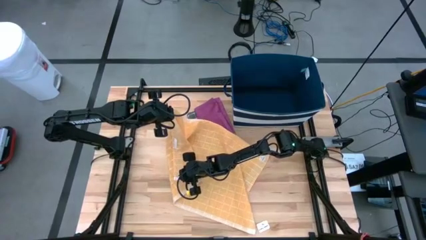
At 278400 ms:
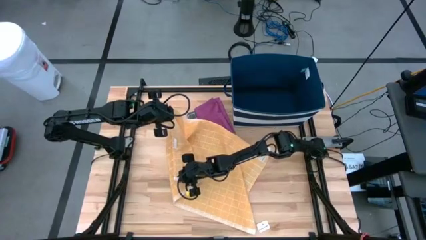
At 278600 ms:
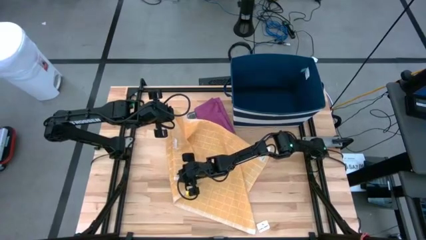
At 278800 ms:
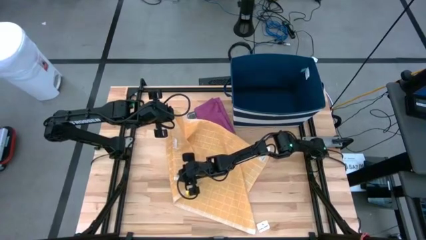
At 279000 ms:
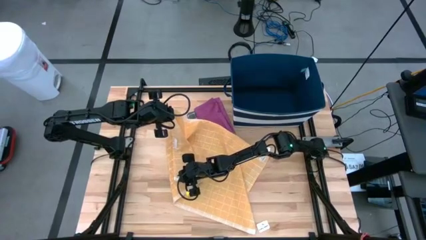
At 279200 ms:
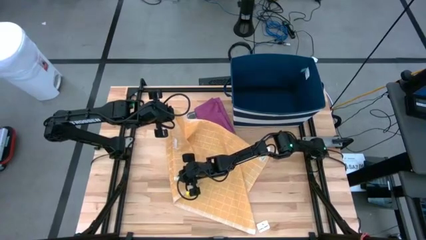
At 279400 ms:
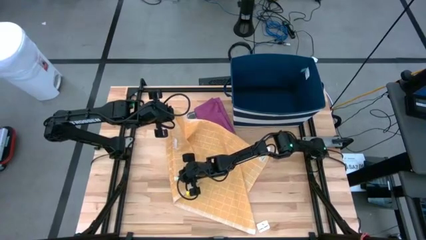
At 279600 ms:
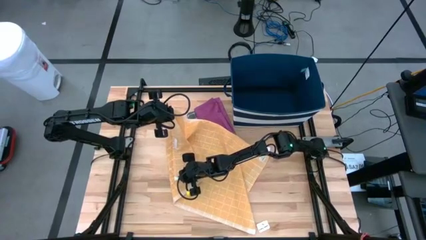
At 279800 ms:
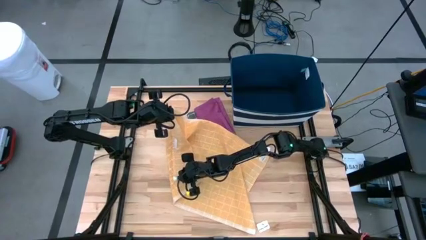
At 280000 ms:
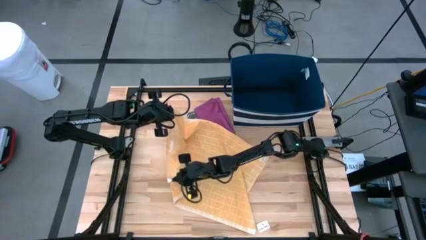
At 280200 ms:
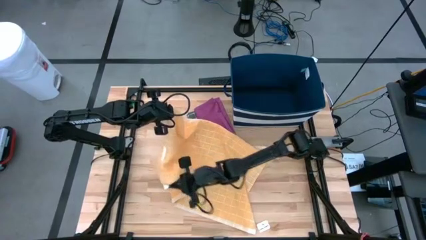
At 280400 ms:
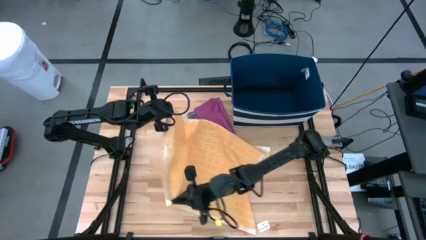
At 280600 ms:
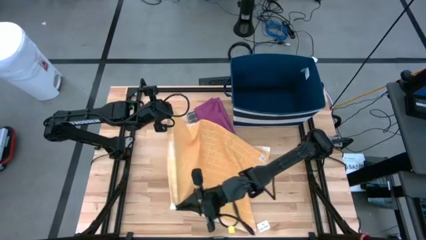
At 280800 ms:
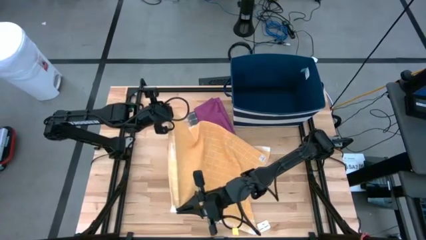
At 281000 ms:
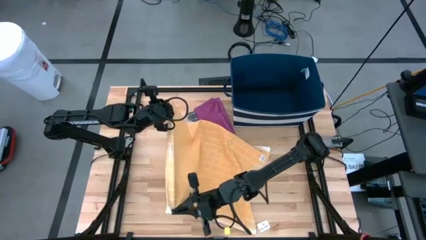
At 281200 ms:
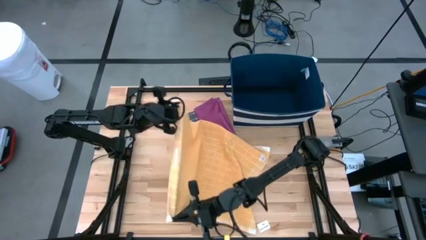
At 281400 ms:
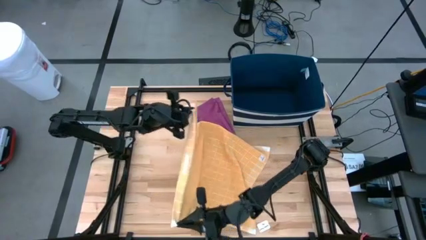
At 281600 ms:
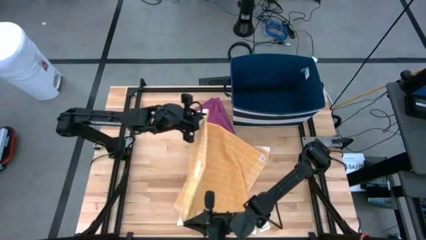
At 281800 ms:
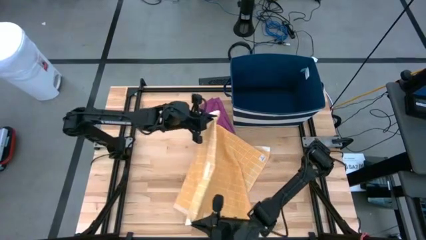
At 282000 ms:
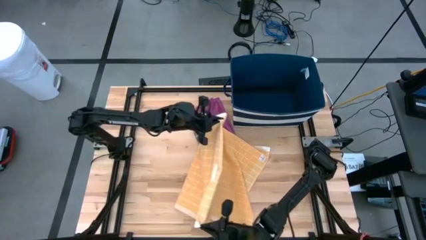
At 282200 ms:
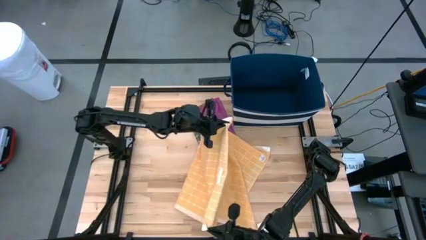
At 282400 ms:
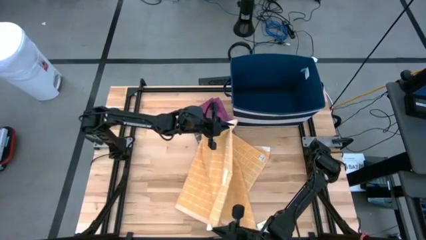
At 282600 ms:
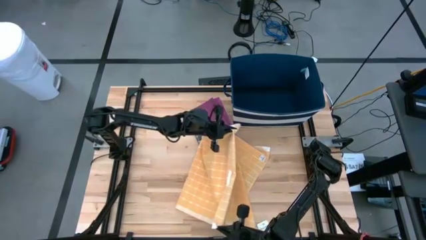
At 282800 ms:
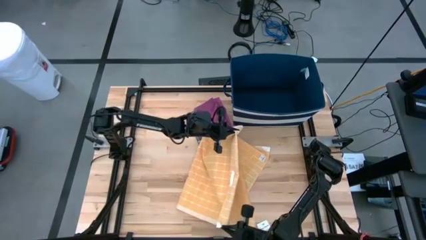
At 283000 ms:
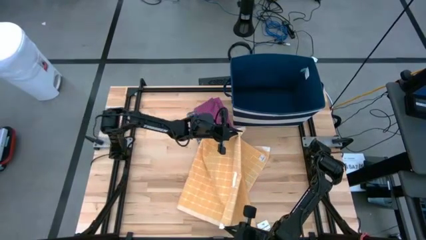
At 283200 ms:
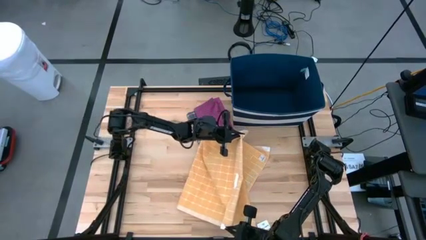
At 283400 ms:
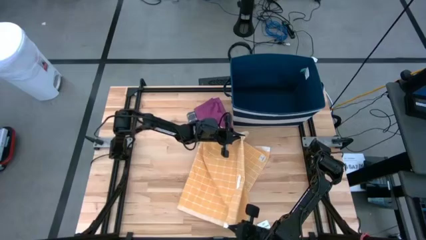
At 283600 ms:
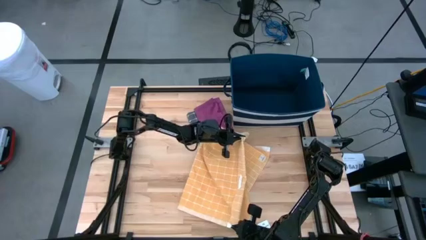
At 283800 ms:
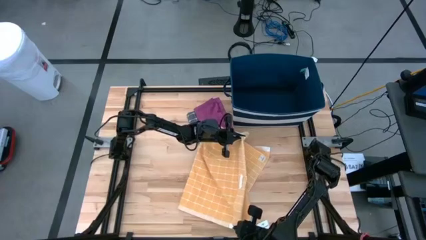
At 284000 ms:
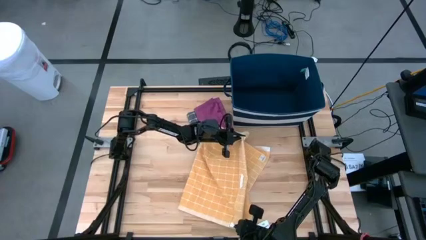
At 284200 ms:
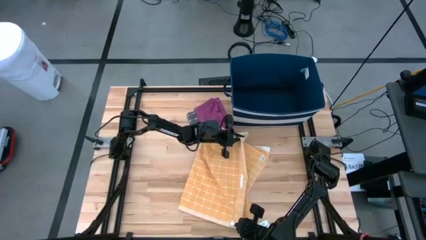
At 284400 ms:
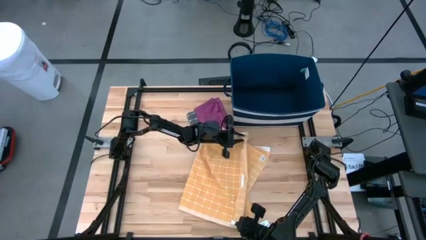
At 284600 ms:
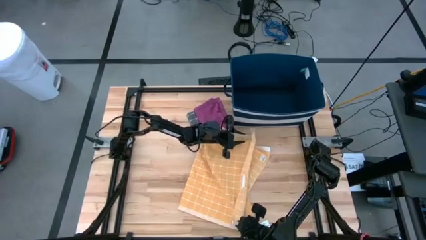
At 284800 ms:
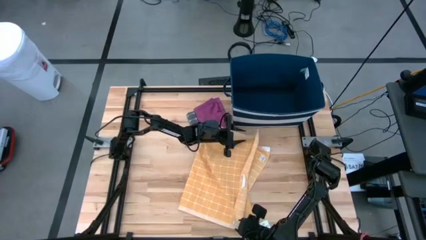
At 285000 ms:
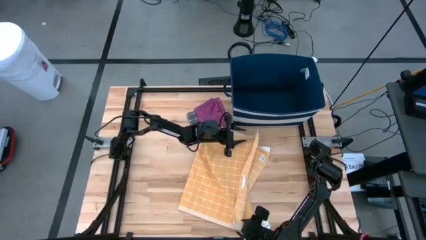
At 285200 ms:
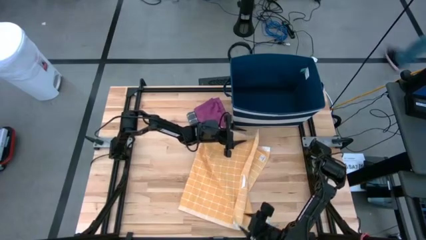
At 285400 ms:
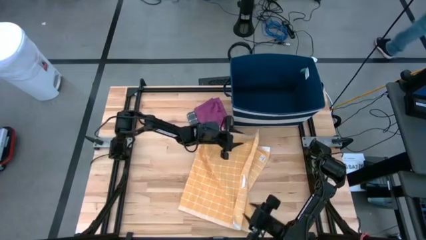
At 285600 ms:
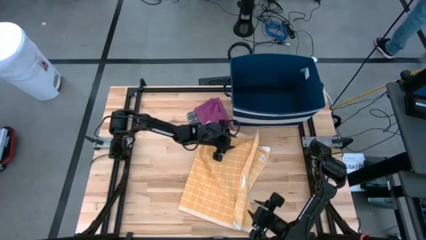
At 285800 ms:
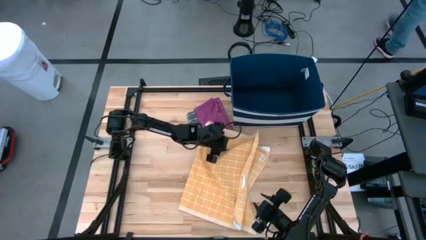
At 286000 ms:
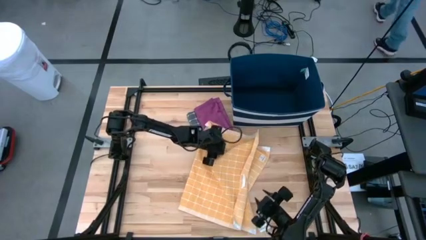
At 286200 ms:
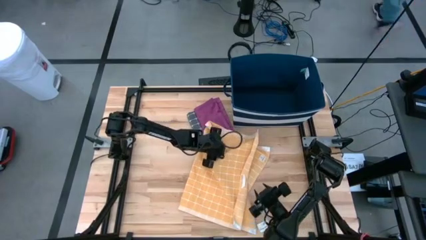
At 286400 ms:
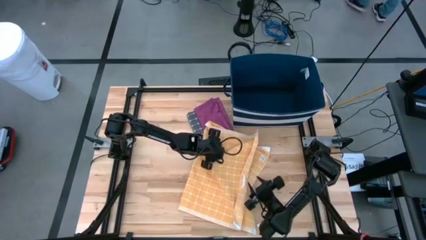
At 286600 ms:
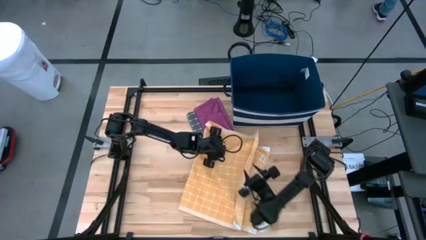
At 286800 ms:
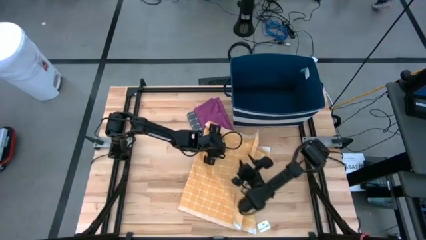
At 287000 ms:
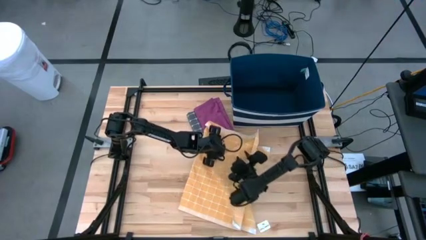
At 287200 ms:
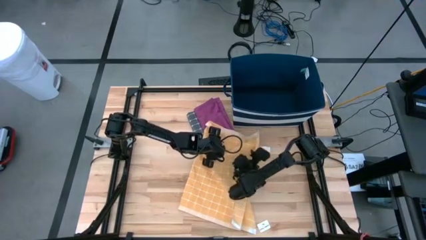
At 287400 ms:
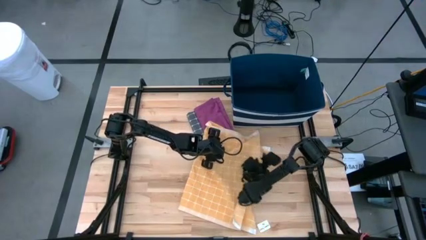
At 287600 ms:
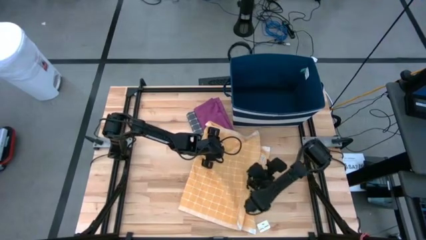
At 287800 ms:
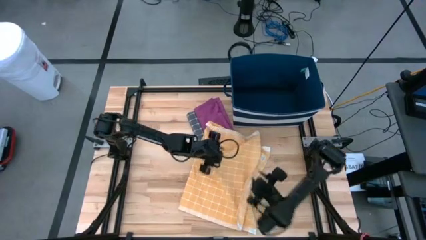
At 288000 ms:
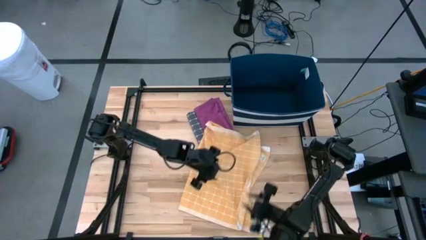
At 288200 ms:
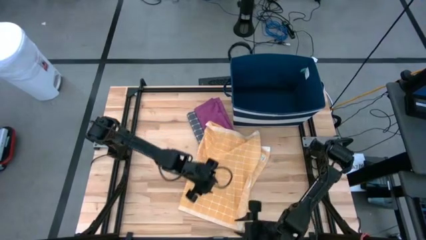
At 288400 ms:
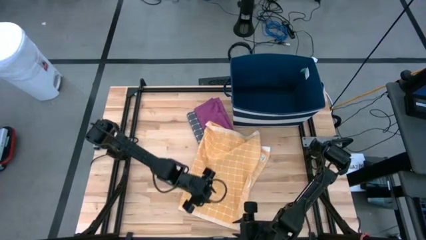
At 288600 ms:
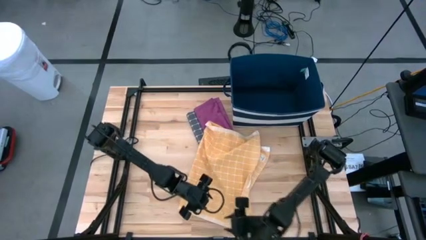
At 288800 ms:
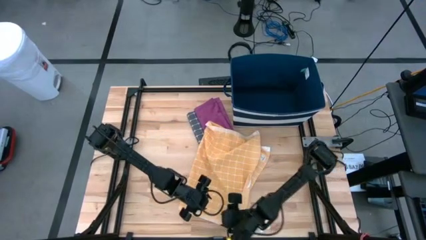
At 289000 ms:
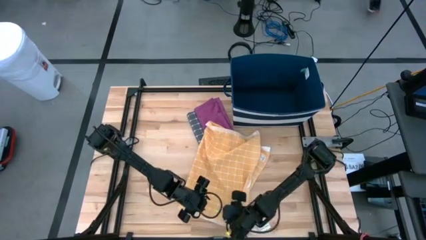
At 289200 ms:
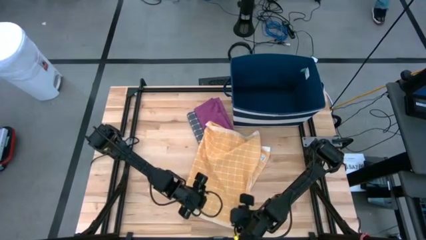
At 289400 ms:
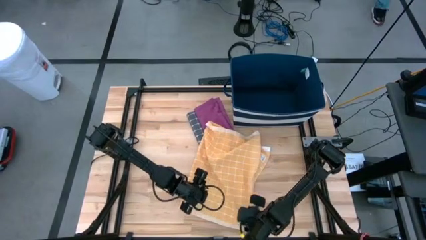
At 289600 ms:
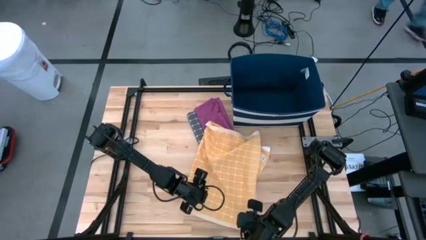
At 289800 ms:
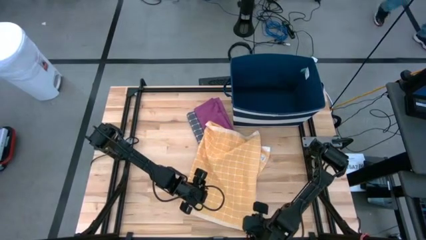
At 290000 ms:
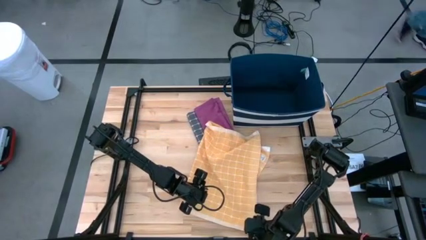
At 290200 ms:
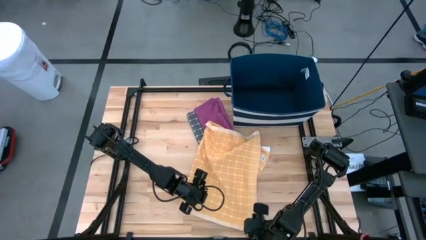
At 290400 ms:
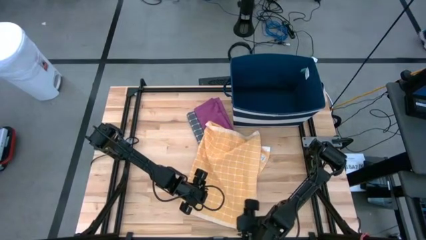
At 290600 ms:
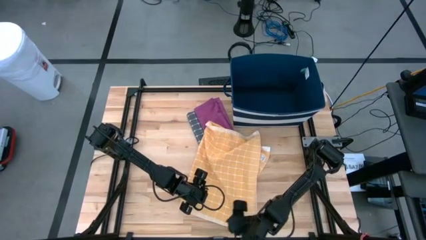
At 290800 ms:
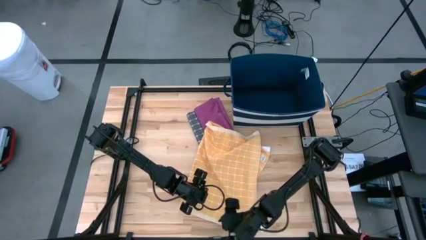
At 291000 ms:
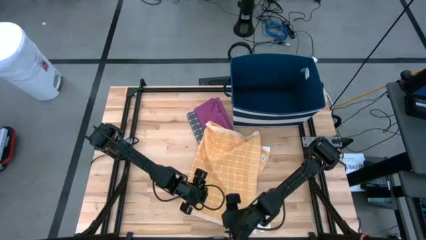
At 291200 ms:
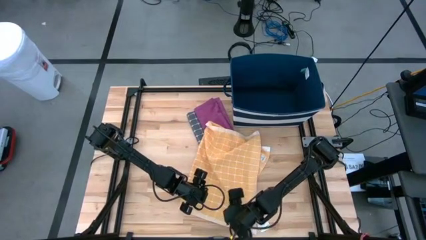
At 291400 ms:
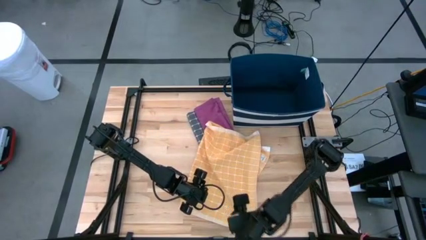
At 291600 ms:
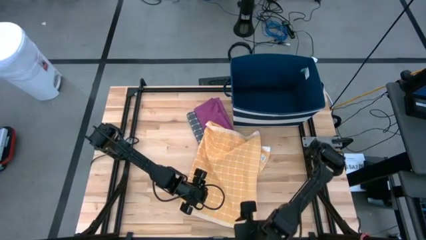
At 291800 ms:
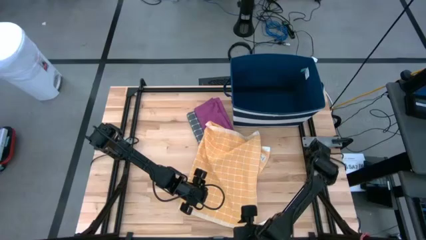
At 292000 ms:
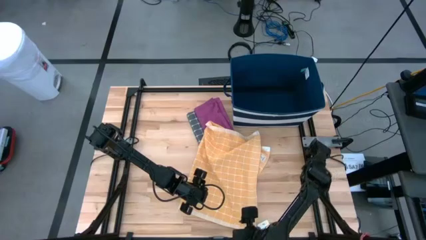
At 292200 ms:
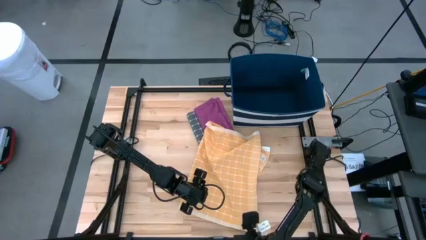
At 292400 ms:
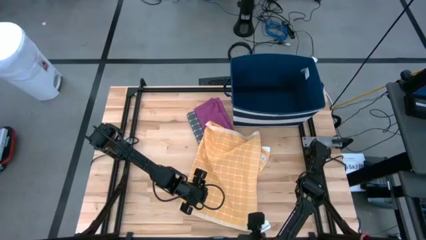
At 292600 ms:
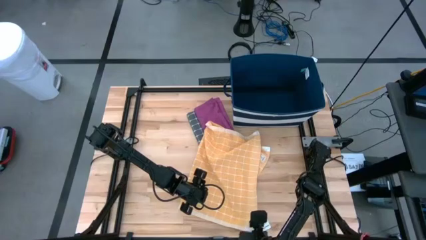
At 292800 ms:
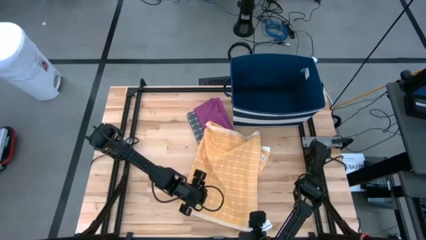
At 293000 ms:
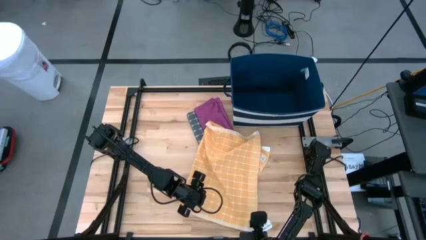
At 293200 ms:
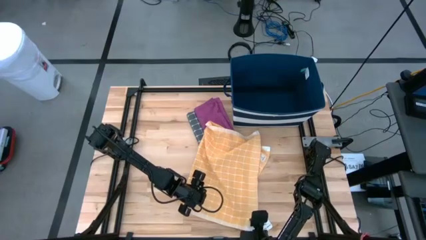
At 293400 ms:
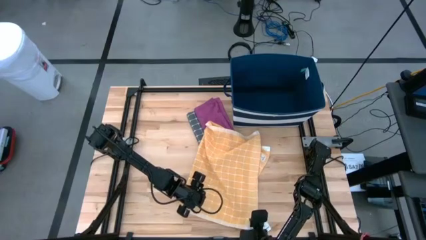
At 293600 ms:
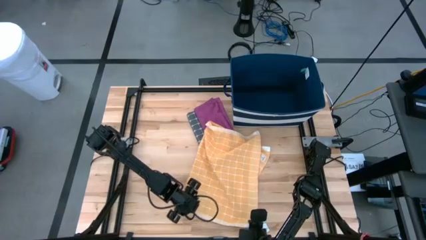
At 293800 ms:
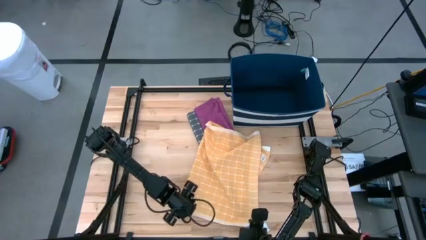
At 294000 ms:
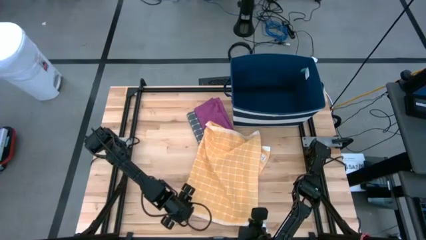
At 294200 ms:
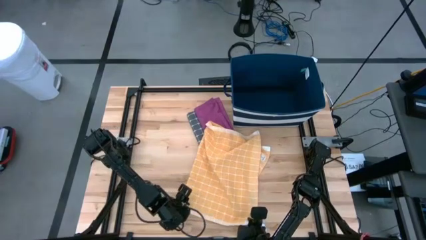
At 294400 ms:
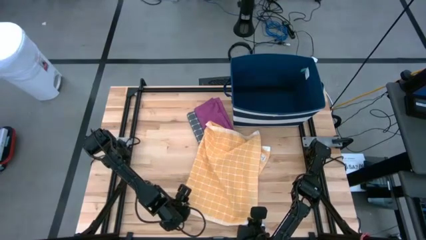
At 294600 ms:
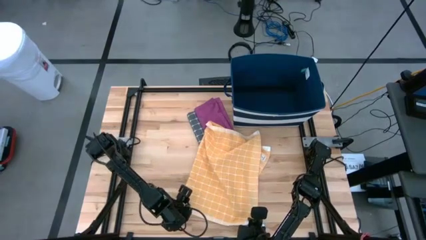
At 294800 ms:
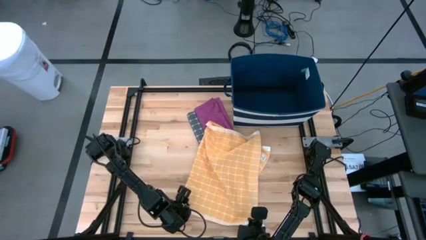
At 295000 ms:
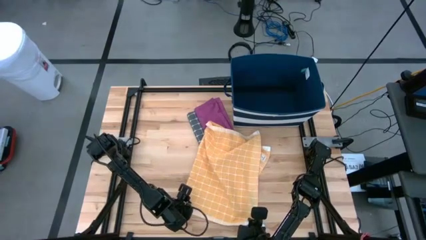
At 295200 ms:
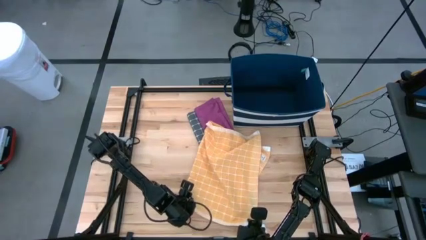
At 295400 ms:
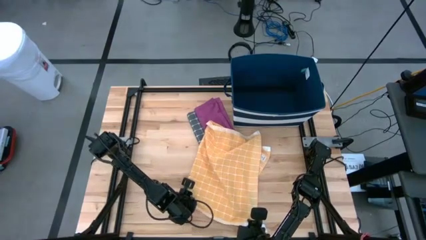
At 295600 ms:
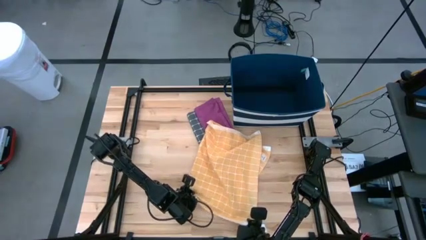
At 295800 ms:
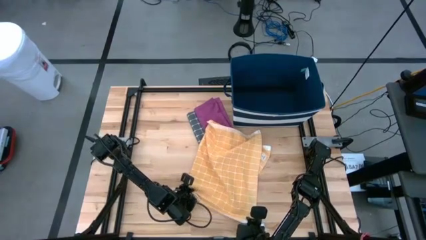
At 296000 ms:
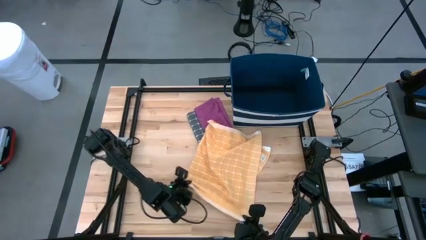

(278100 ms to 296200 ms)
Task: Fold towel
Fold the orange checkered towel
